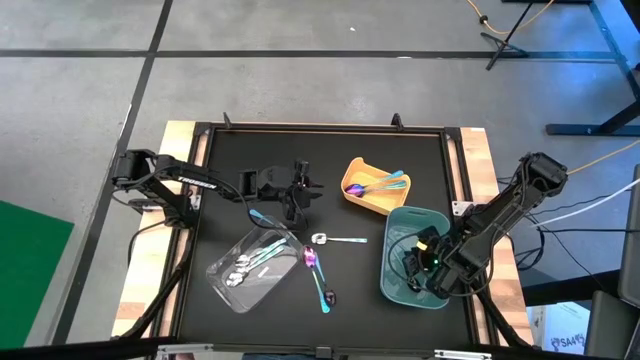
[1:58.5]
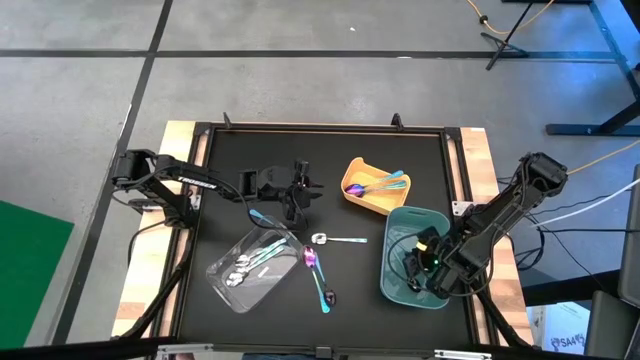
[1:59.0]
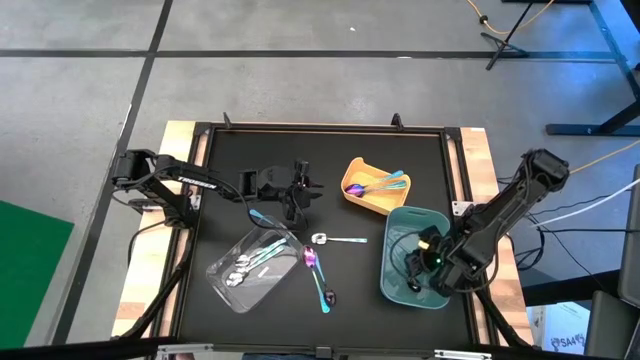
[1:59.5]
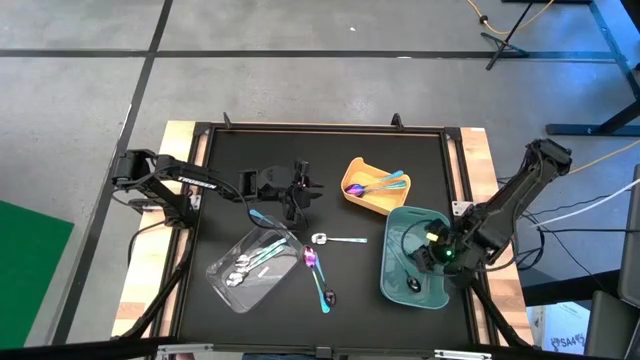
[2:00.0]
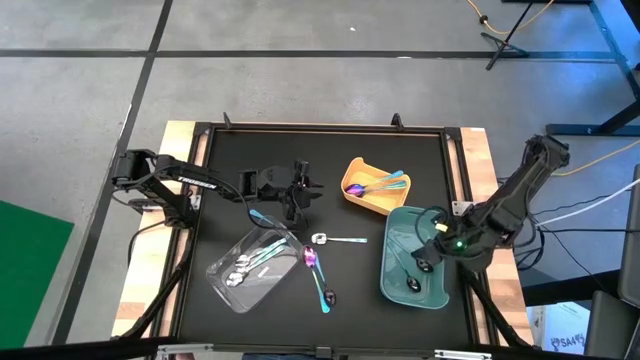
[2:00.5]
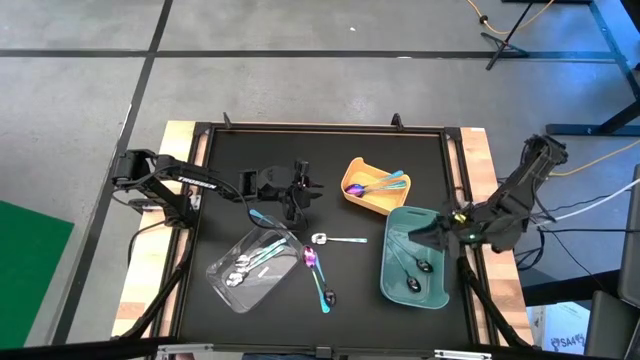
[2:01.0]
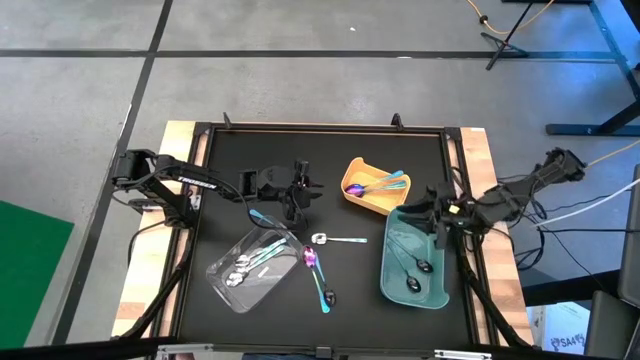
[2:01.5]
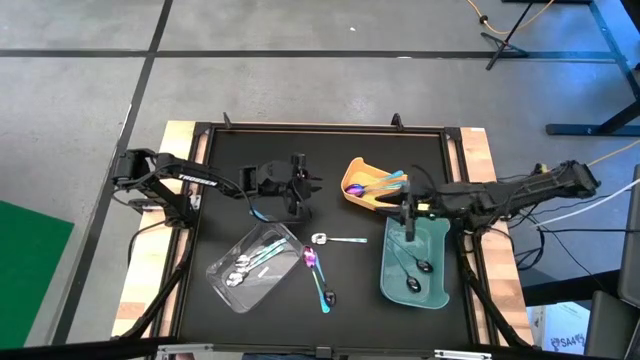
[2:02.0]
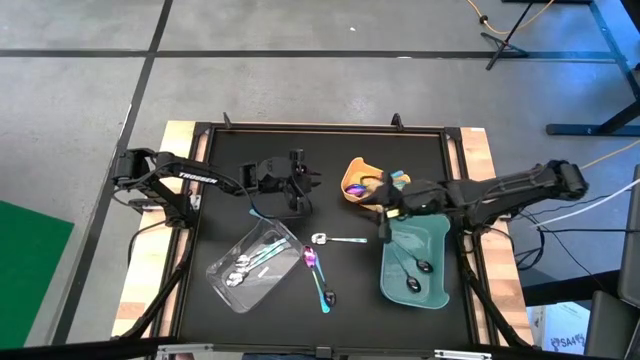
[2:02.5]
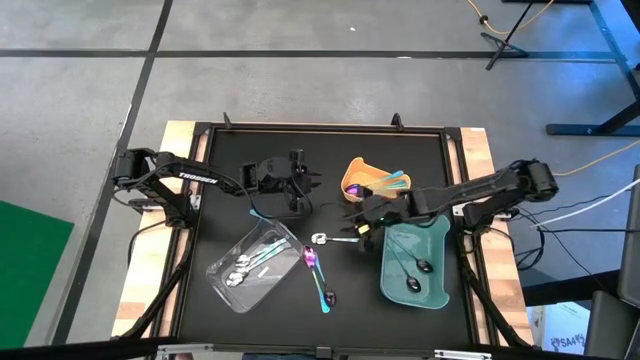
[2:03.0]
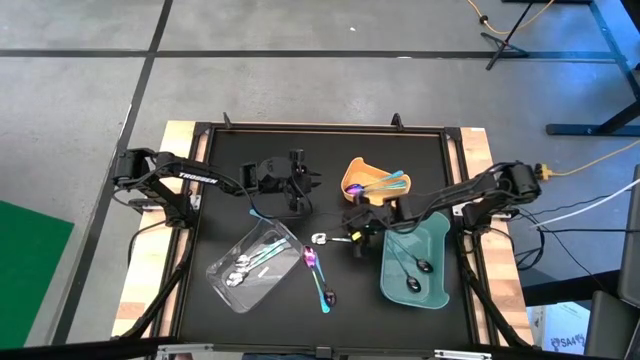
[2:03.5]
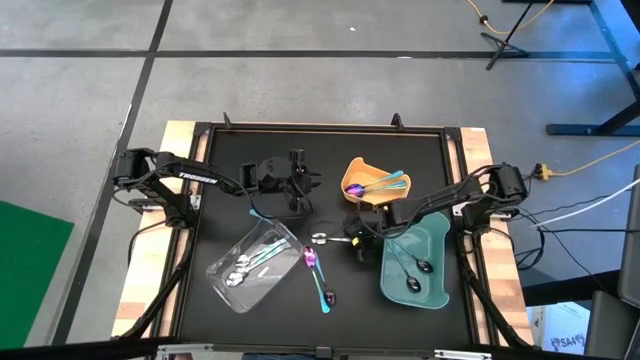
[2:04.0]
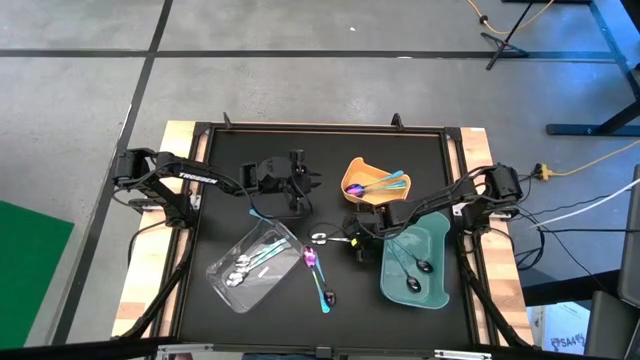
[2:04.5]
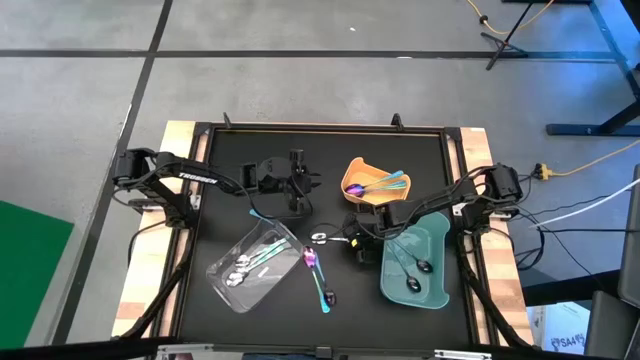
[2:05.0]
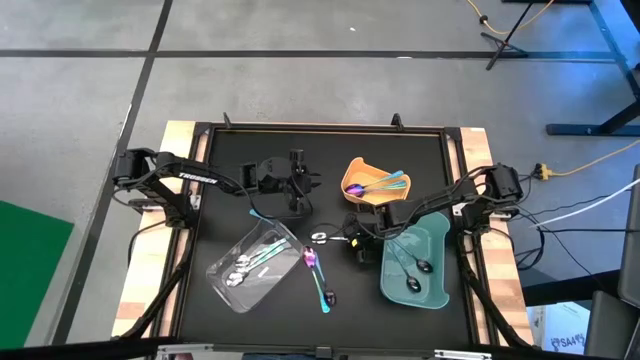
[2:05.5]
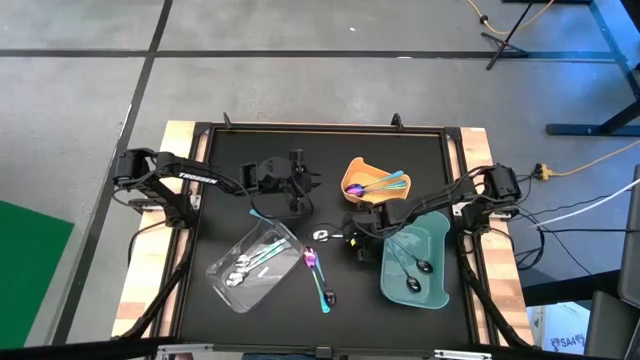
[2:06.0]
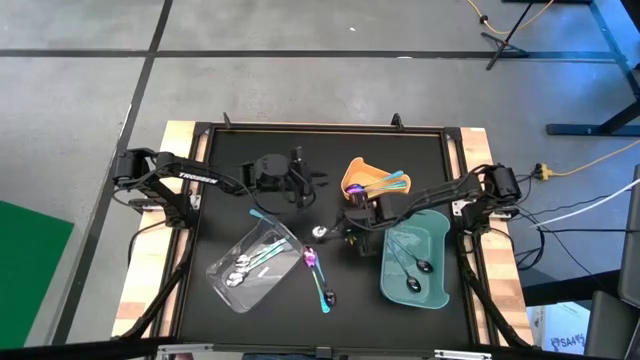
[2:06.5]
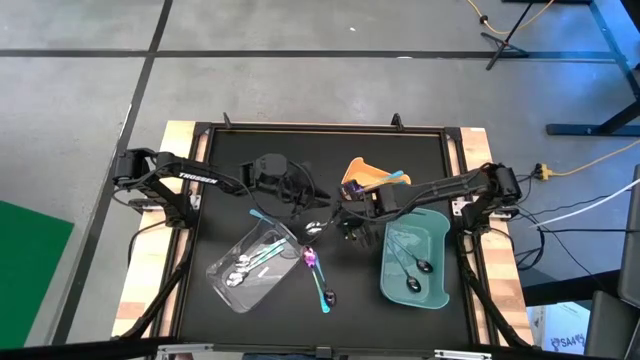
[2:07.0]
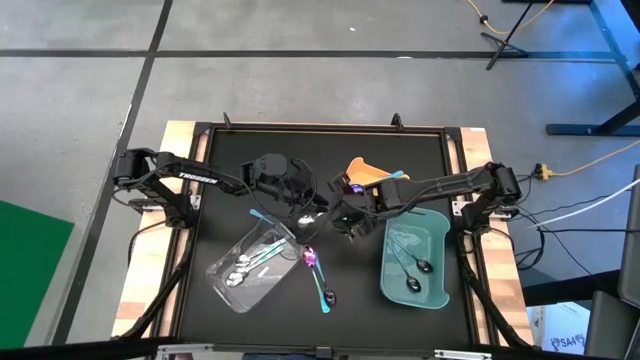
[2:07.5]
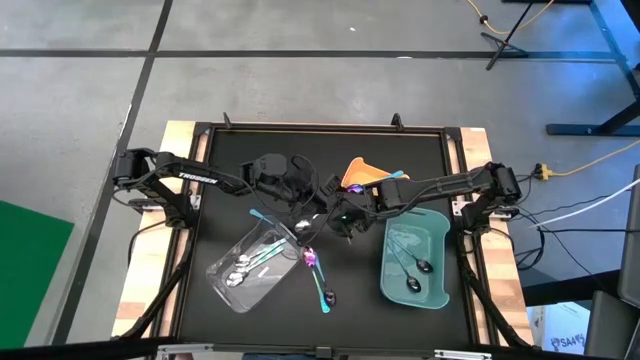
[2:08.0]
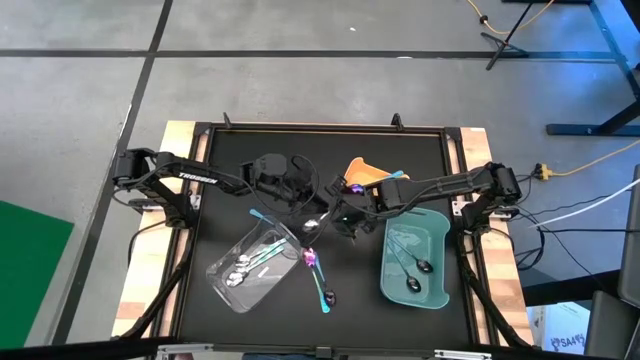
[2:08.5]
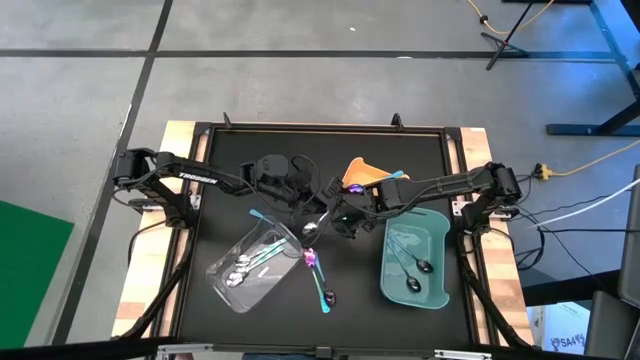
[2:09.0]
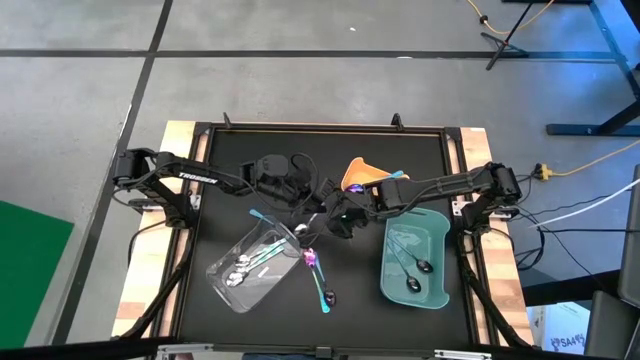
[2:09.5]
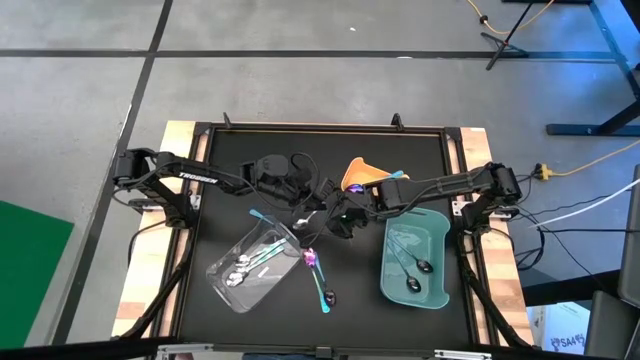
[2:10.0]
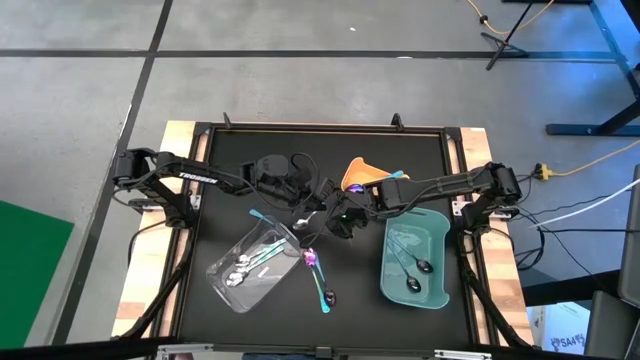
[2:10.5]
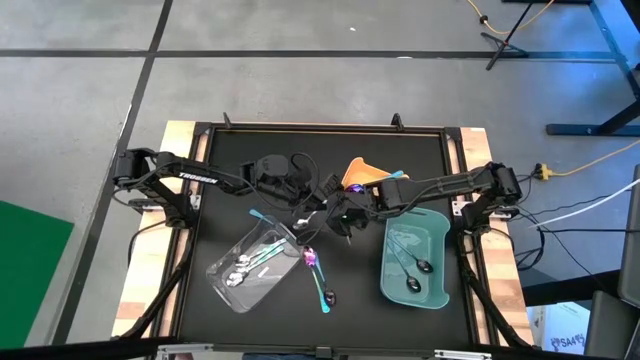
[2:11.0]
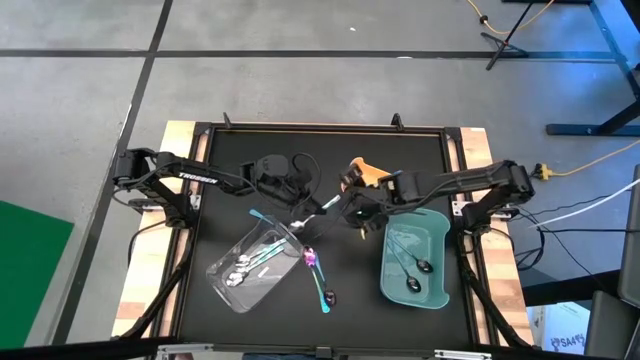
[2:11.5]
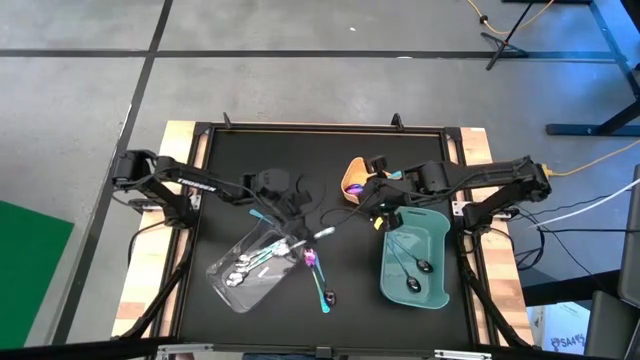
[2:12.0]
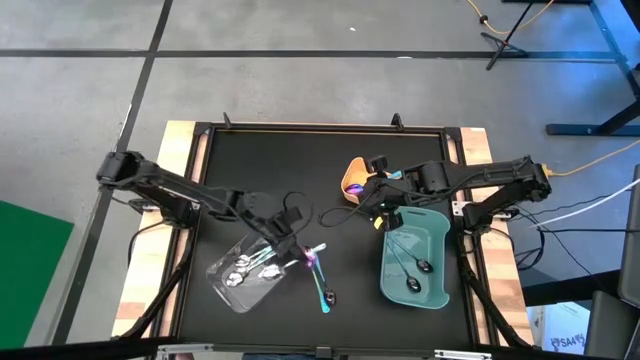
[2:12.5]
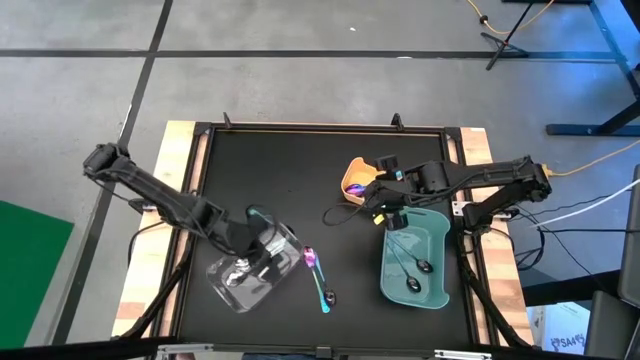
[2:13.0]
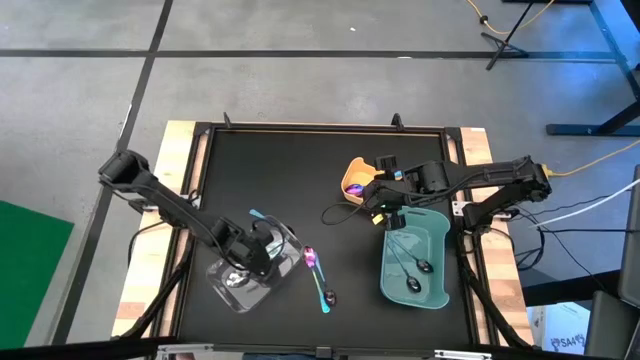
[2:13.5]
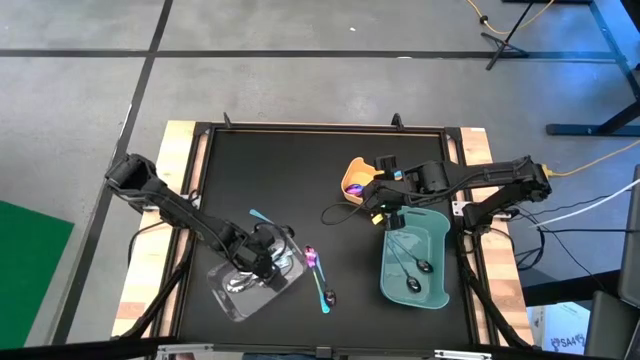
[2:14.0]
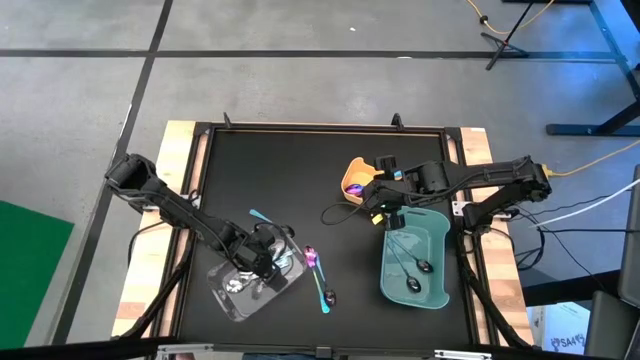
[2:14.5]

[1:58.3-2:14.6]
Task: Sort silverware by color (type)
Put the white patterned spoon into the transparent bin

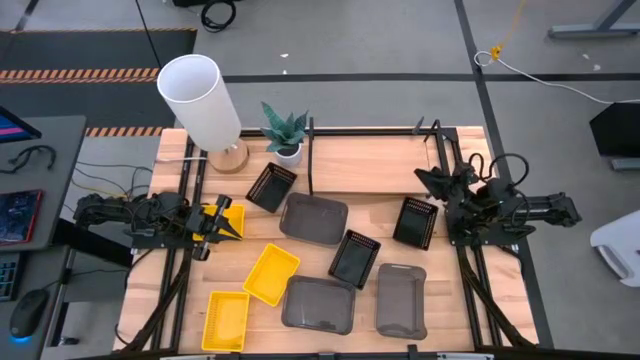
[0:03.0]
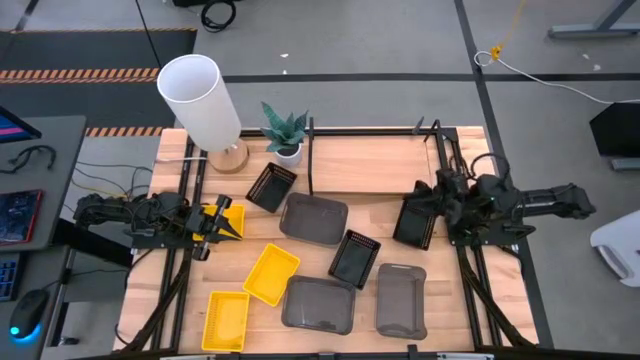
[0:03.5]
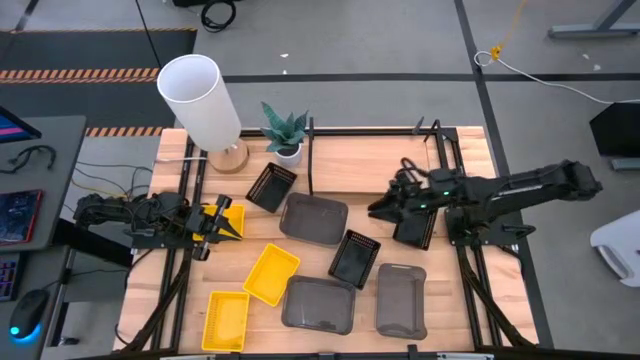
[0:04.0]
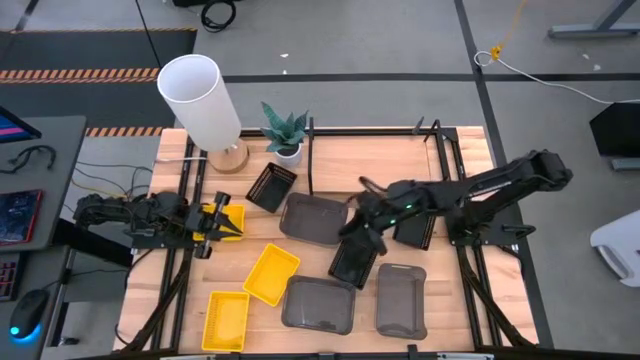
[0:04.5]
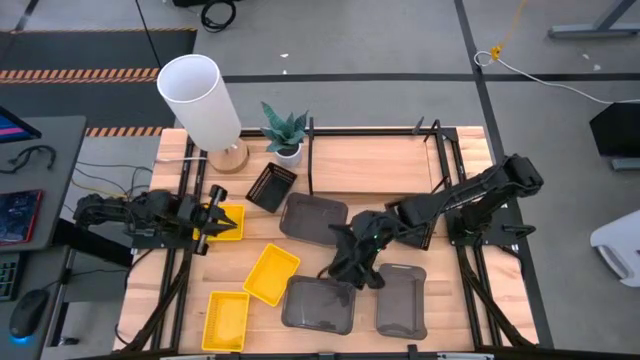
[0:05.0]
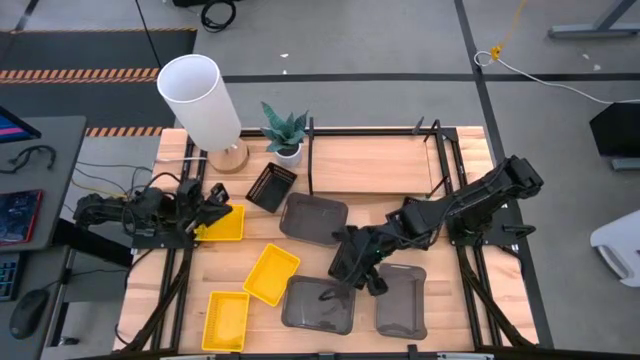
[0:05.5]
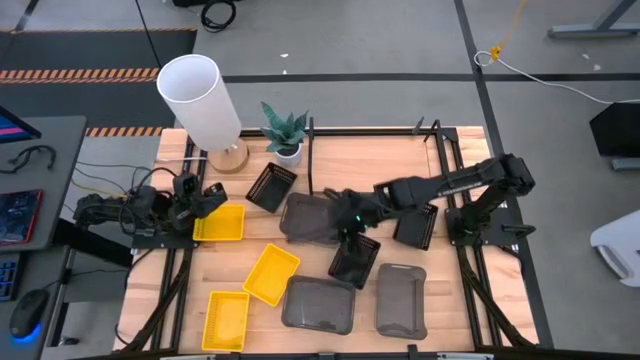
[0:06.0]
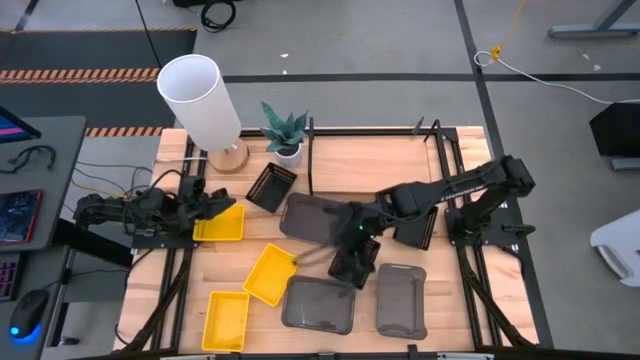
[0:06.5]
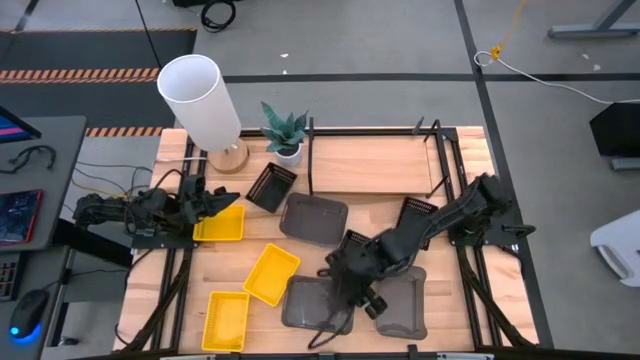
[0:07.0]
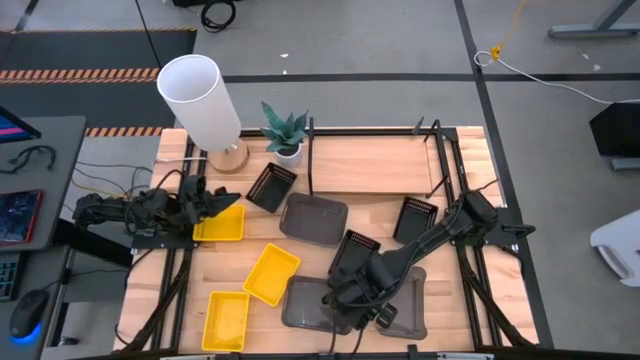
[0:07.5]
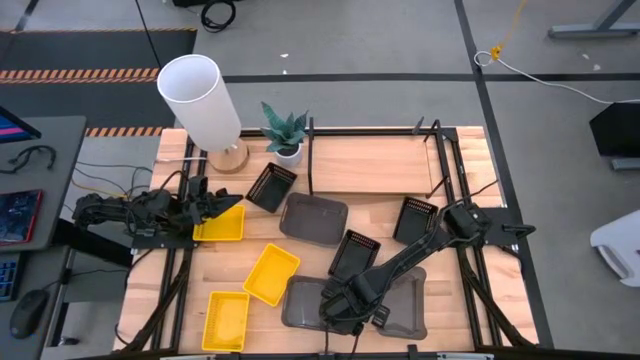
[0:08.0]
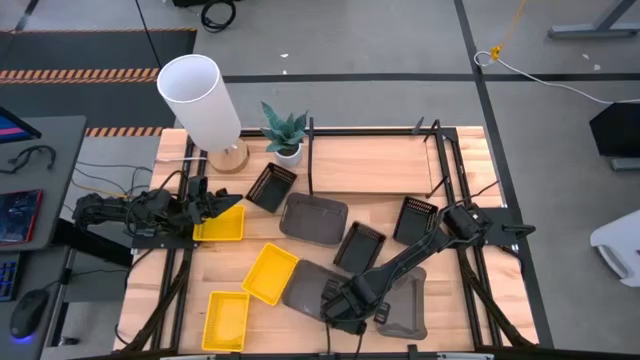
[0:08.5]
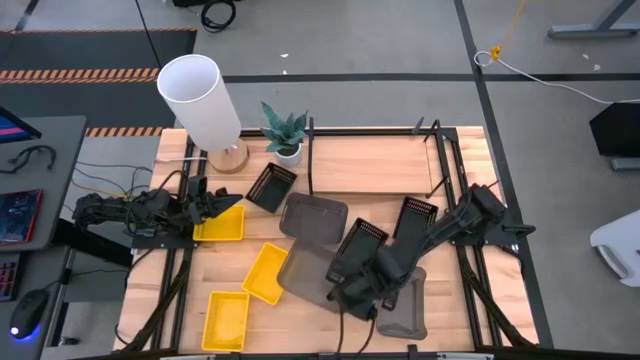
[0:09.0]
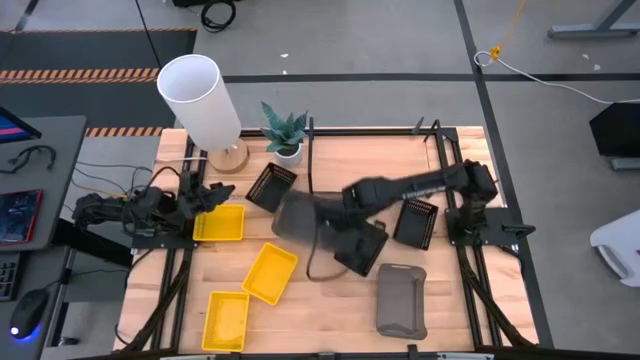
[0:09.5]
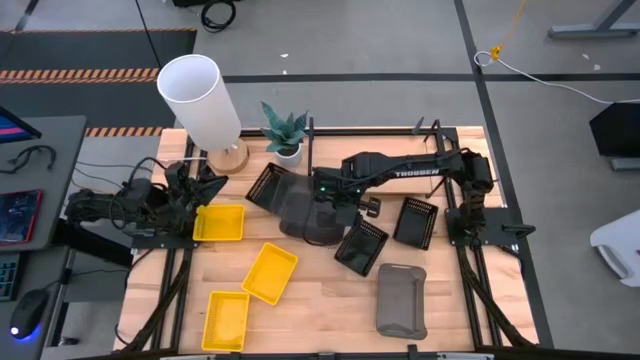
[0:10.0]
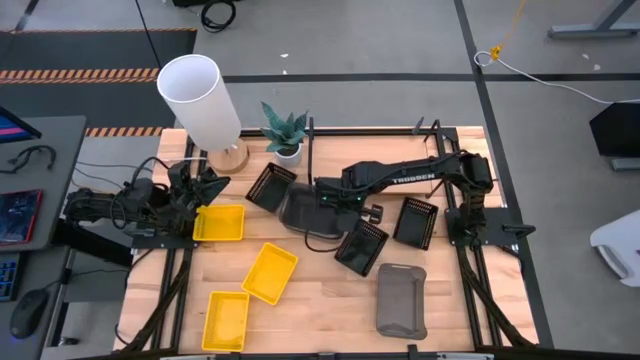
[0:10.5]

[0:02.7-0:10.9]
Task: Stack baskets on shelf by color
Stack the bottom left gray bin on top of the top gray bin
